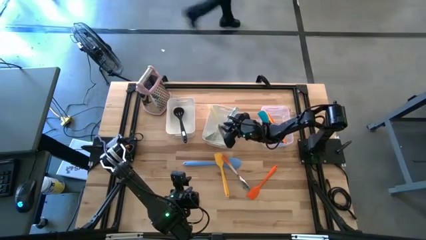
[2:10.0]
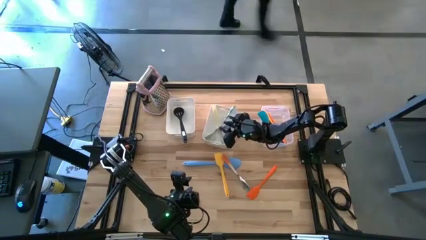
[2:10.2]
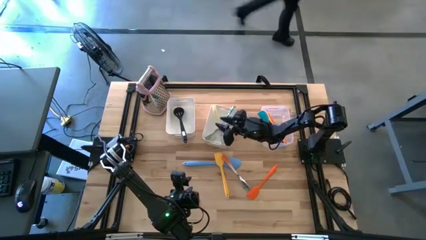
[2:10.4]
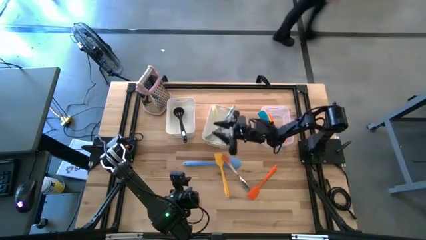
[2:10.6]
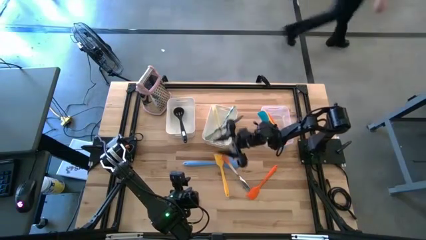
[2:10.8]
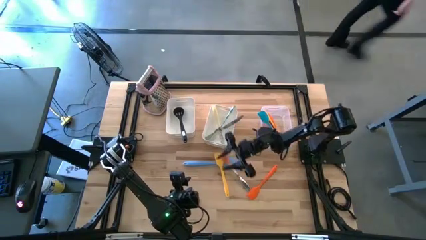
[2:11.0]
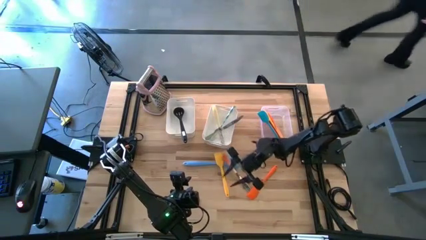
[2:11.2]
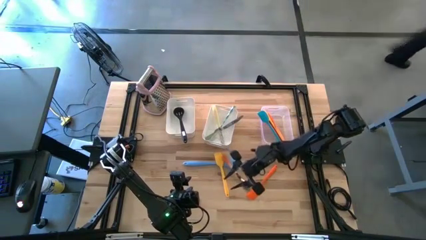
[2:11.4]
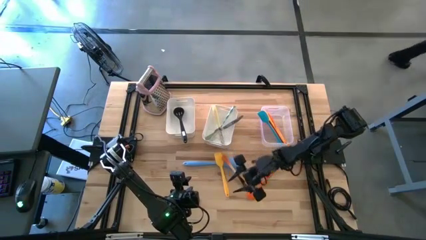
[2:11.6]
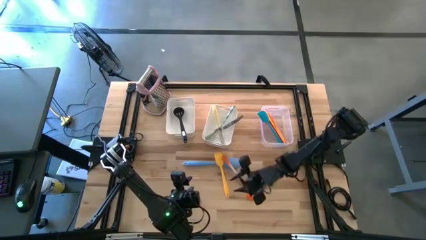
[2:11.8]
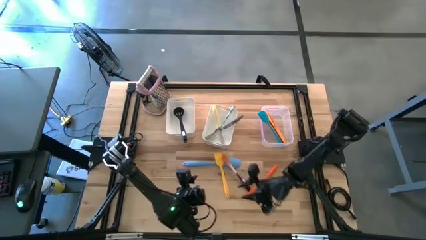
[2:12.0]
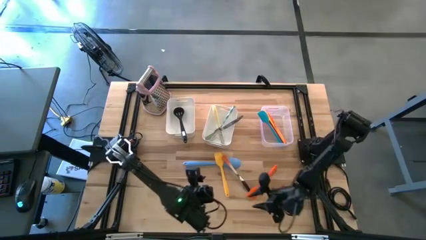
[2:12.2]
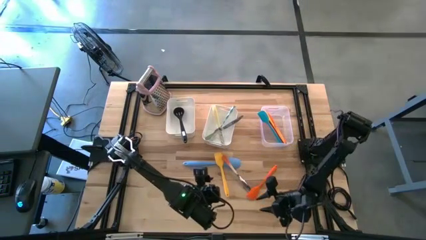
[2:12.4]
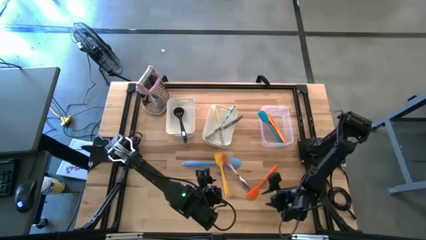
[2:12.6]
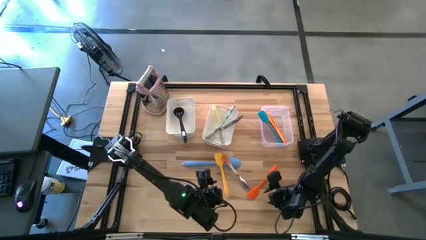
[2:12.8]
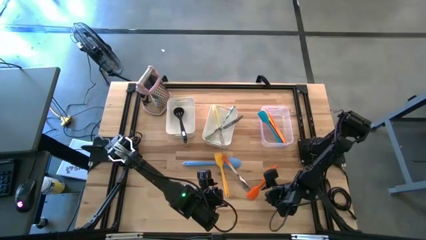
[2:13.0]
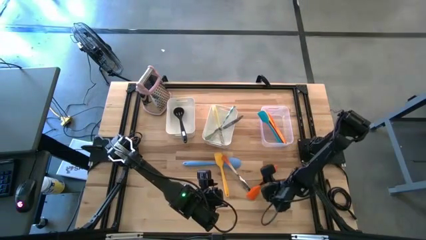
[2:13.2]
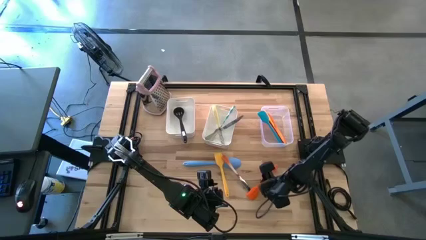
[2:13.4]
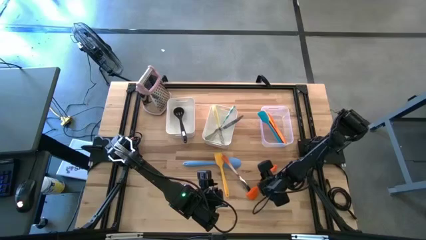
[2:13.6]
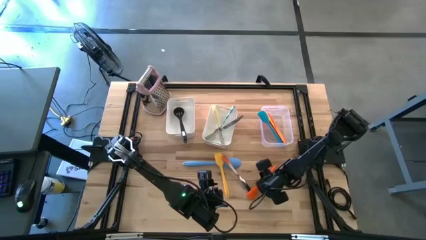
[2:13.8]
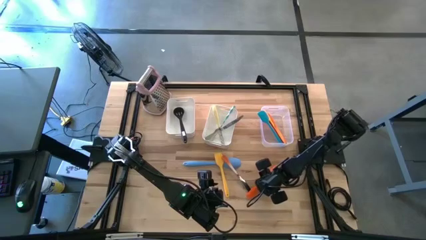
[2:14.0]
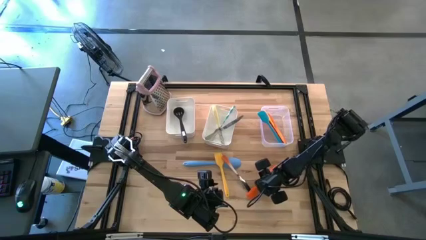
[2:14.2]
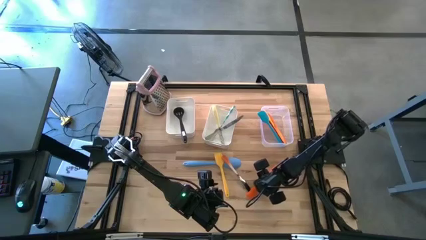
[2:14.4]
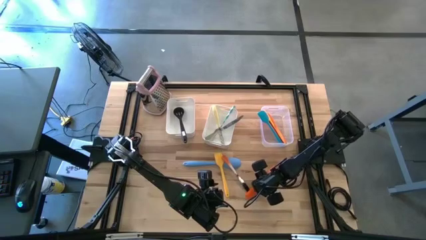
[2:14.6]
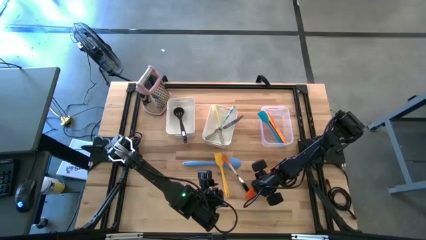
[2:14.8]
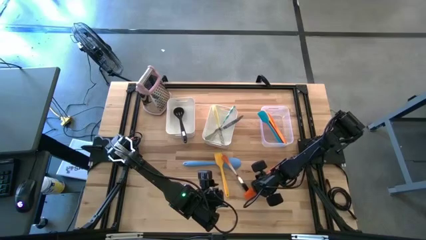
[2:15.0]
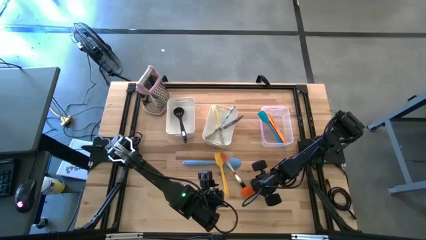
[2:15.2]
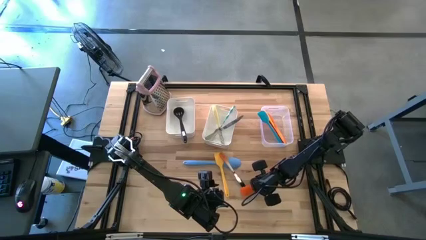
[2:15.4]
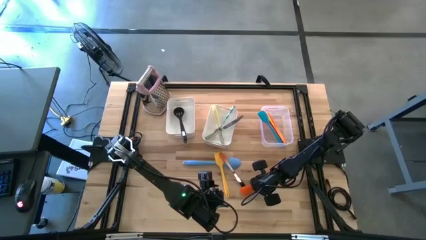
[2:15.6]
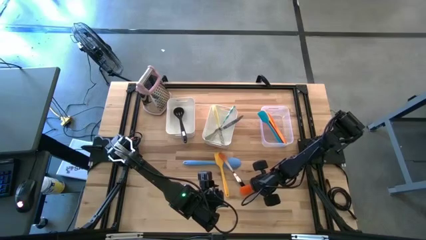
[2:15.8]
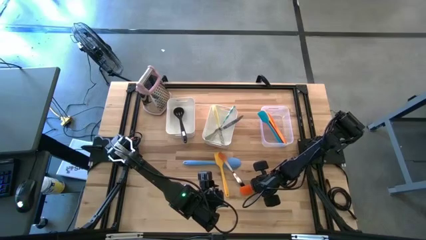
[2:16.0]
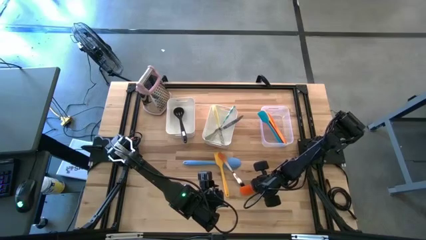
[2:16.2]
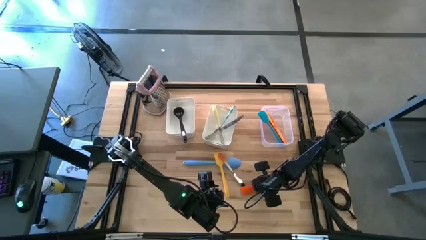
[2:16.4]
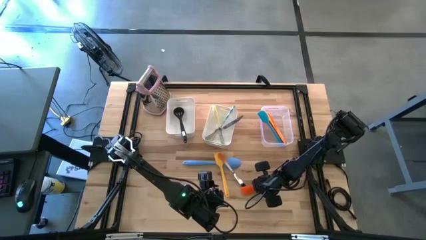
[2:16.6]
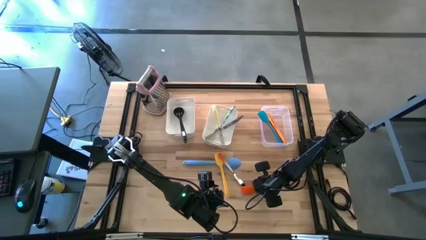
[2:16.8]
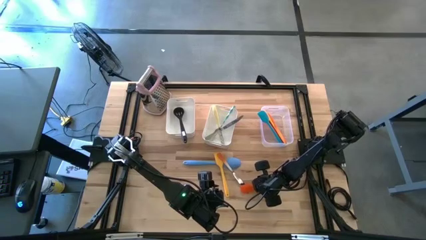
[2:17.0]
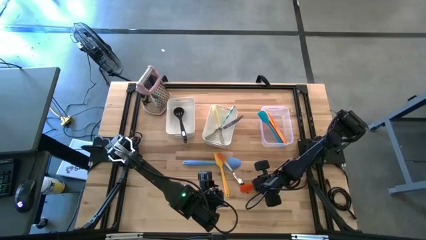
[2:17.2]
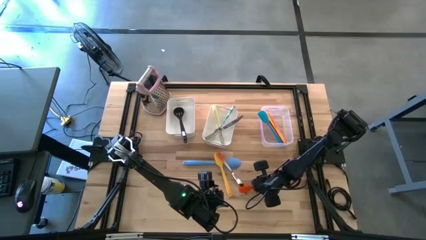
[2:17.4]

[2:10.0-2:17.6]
Task: Pick & Place Kitchen Items
Put the orange spatula into the transparent bin

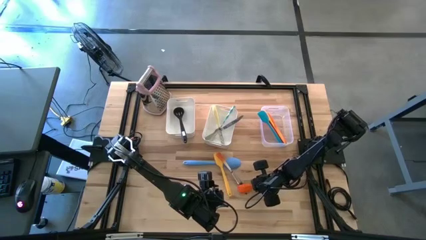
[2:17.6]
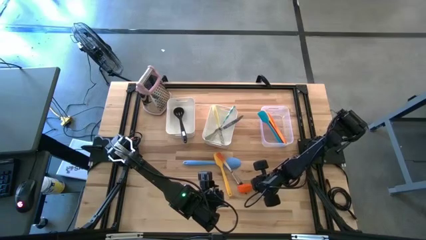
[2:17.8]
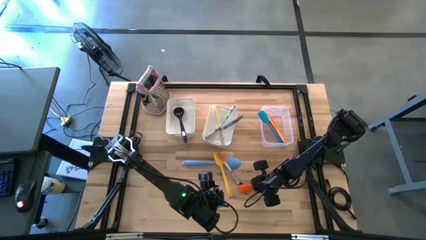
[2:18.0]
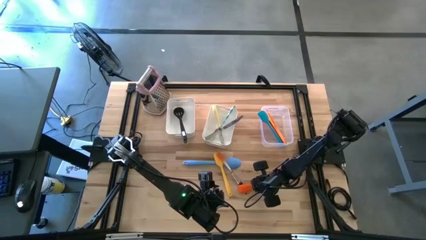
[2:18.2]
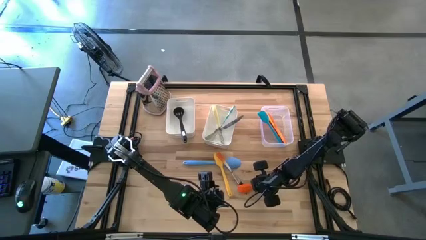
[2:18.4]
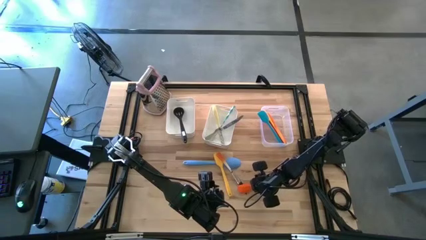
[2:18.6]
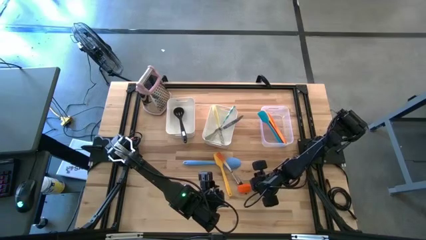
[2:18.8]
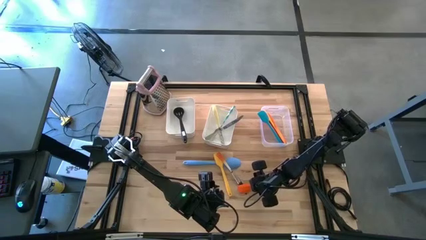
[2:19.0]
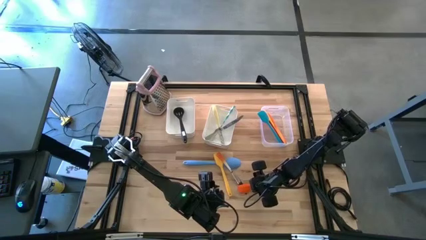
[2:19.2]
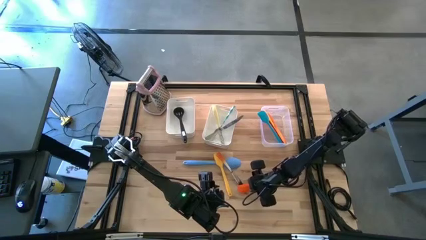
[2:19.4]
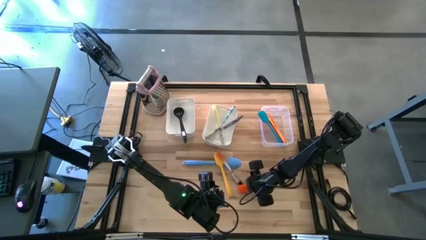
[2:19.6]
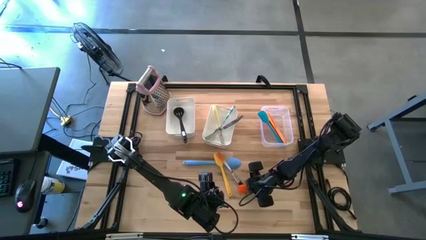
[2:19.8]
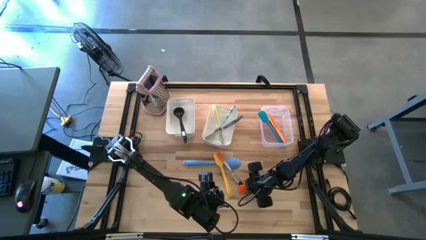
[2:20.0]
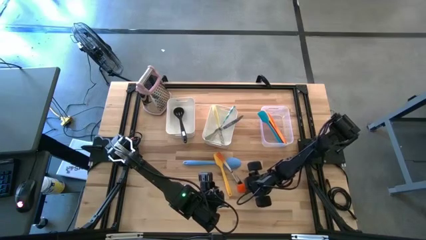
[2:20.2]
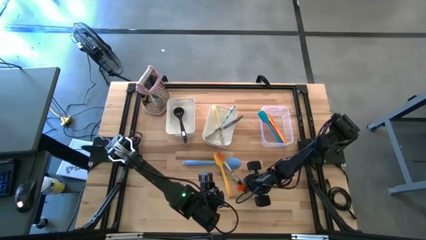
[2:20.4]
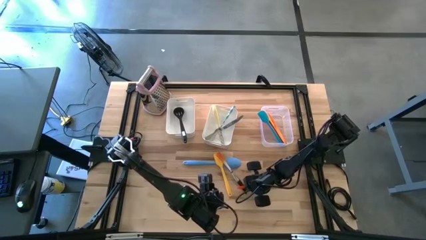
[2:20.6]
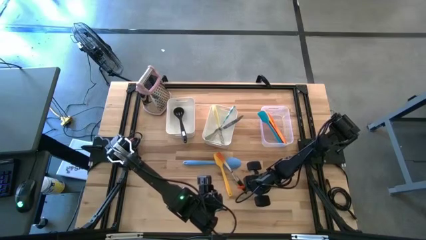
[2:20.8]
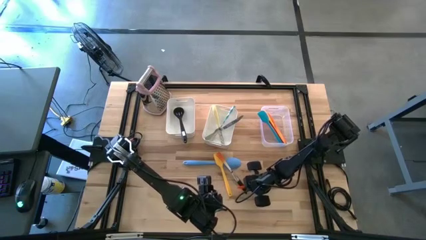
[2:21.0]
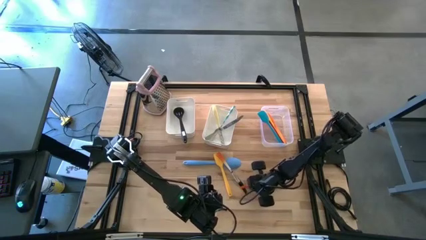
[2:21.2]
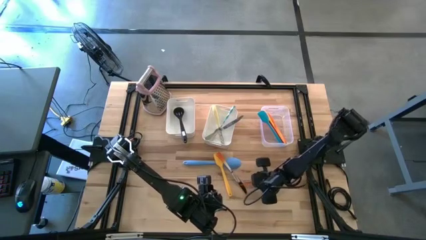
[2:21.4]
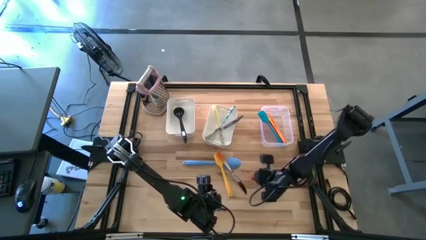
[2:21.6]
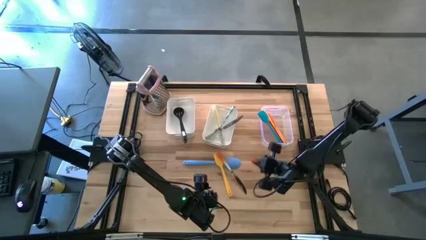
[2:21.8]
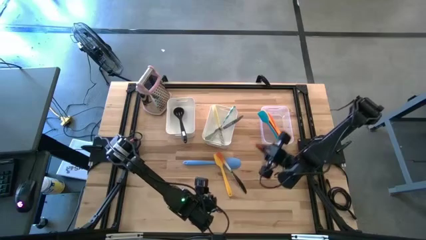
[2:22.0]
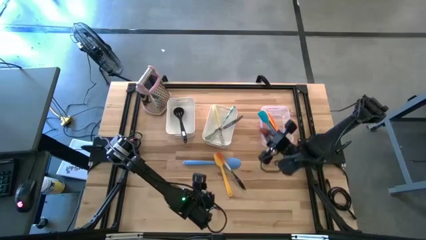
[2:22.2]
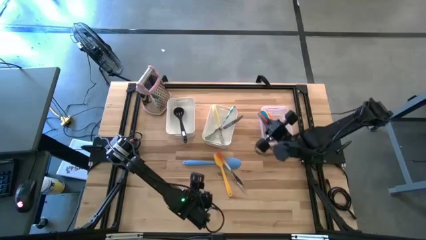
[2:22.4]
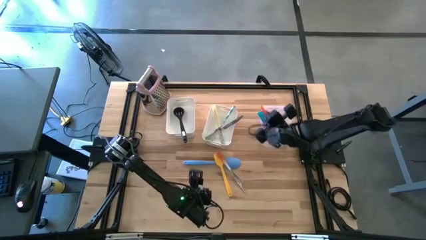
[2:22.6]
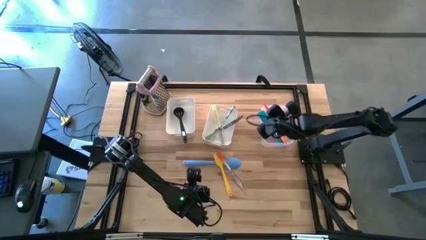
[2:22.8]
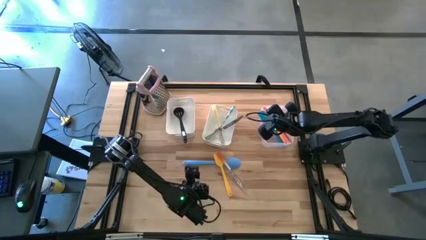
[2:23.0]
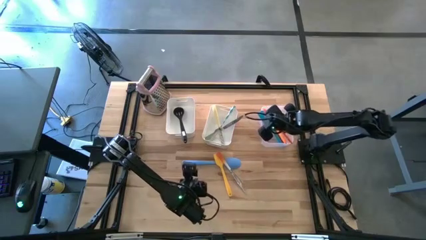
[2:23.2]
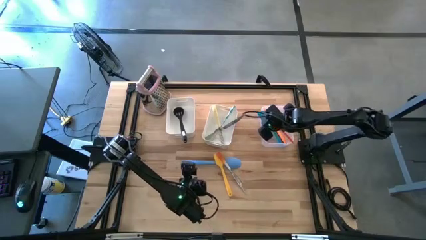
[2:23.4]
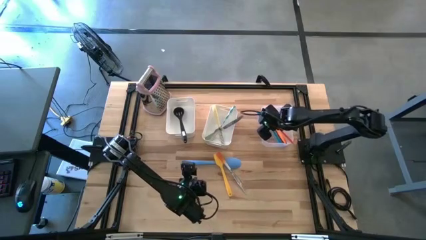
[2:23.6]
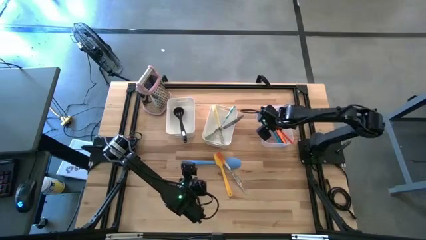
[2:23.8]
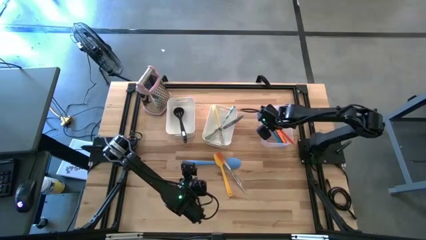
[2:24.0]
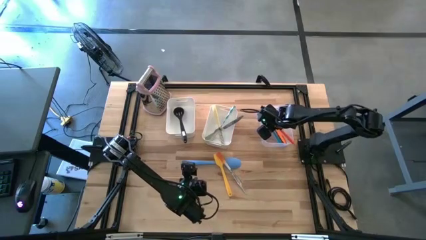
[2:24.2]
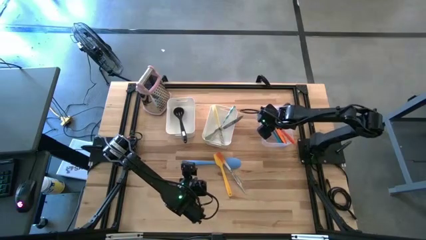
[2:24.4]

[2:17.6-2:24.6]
Put the orange spatula into the transparent bin
